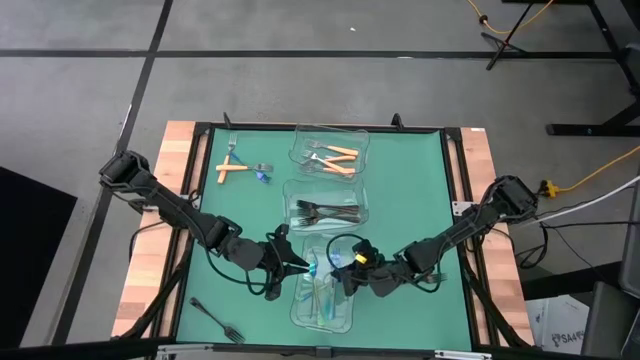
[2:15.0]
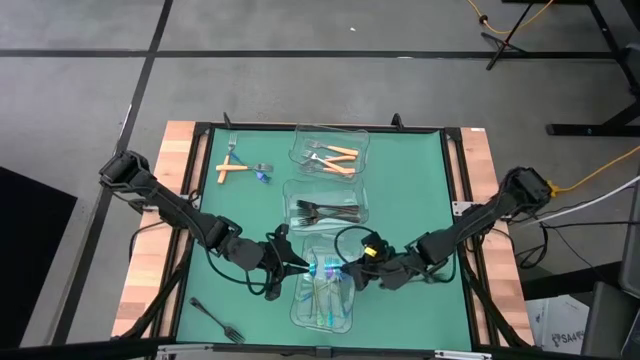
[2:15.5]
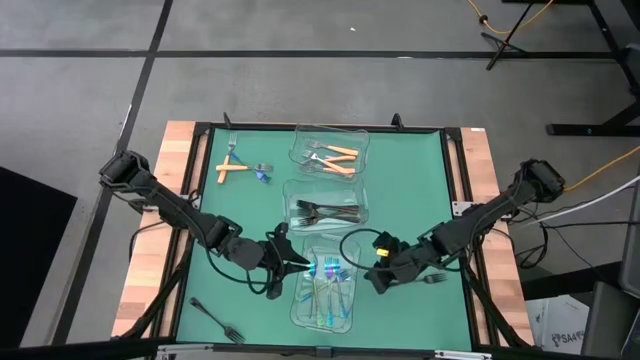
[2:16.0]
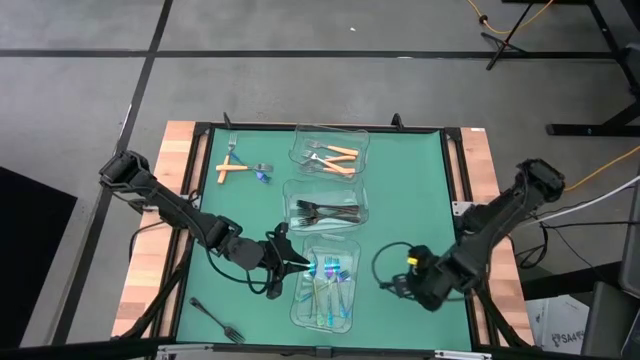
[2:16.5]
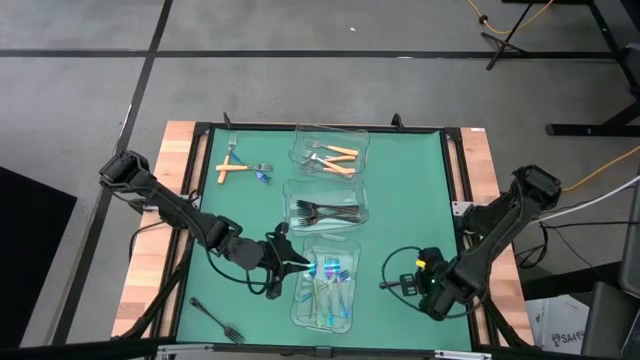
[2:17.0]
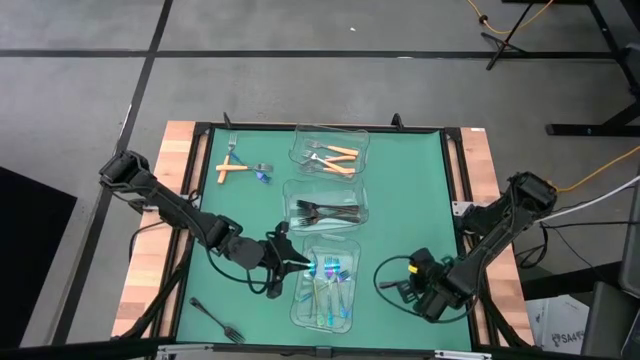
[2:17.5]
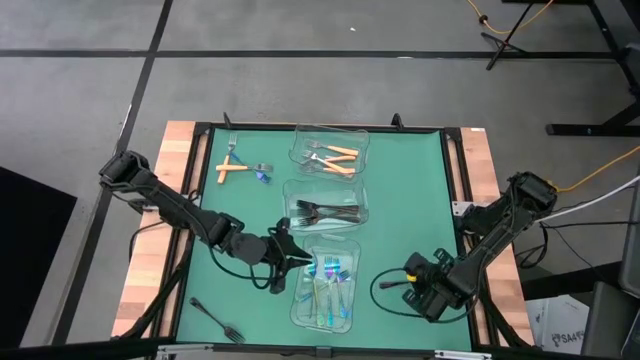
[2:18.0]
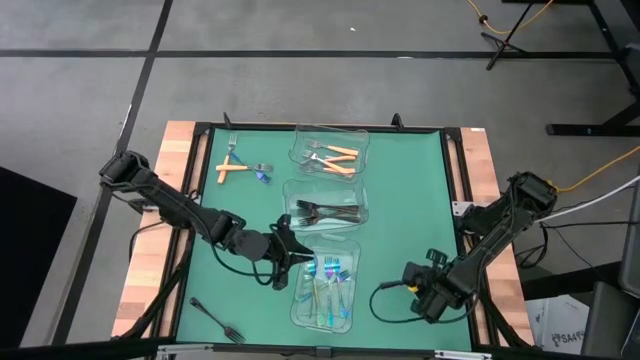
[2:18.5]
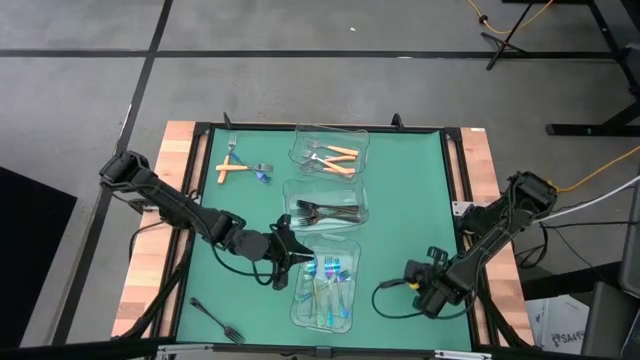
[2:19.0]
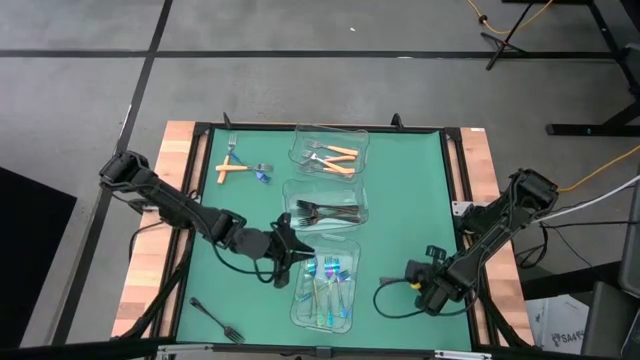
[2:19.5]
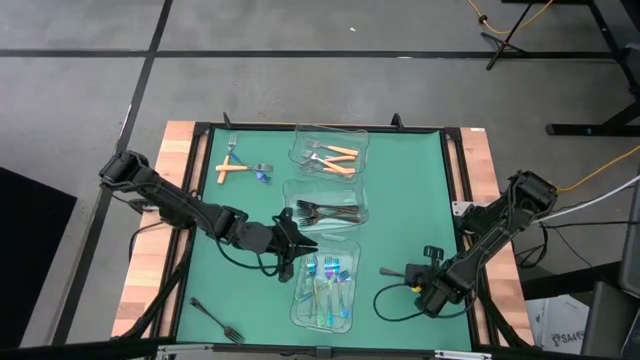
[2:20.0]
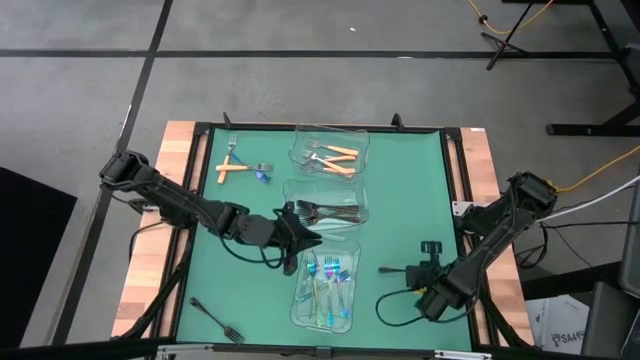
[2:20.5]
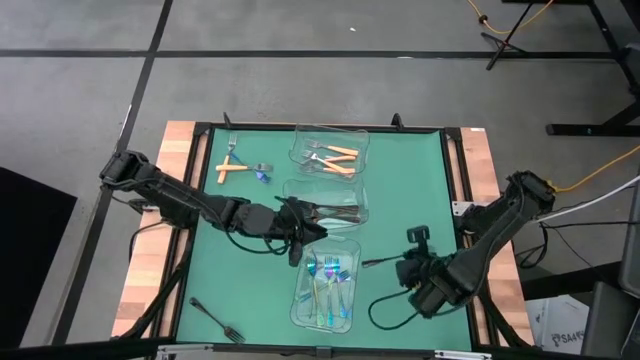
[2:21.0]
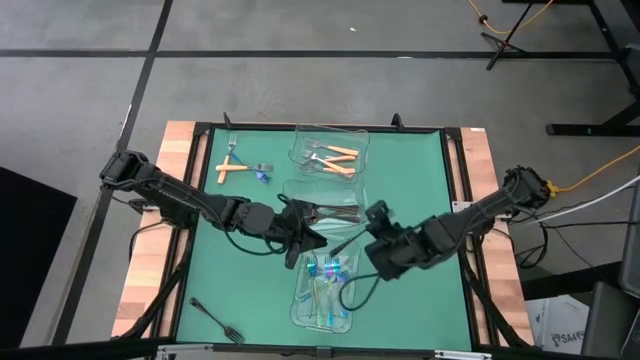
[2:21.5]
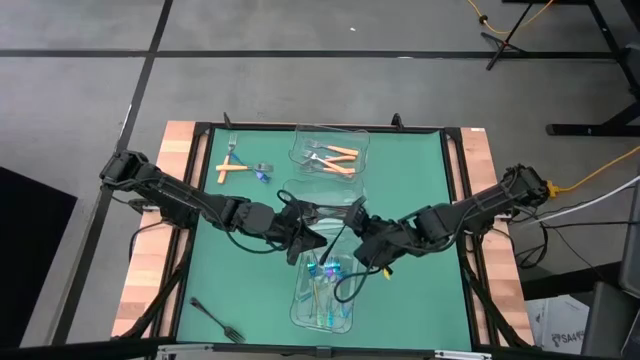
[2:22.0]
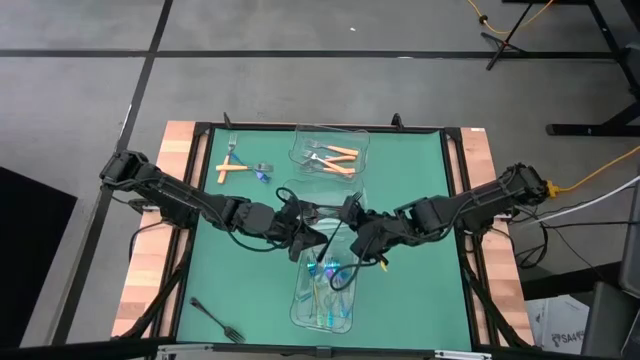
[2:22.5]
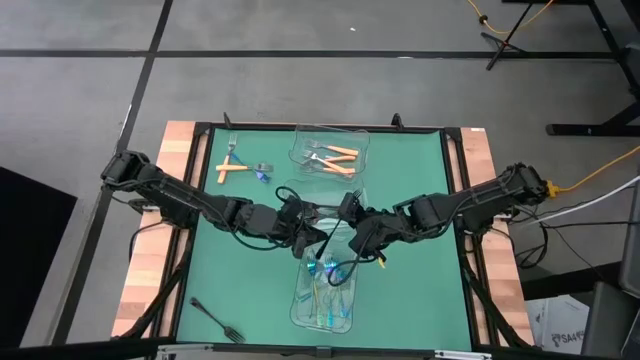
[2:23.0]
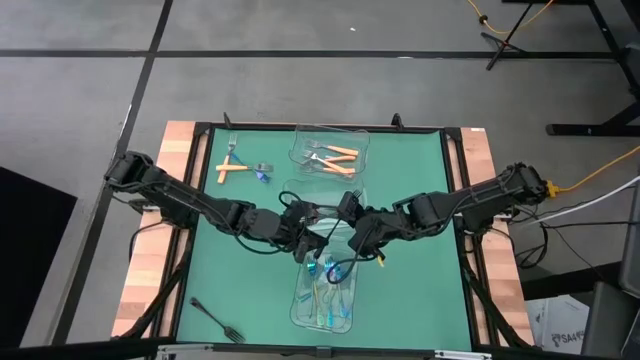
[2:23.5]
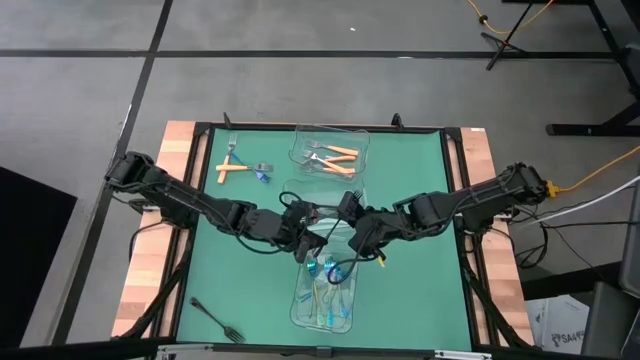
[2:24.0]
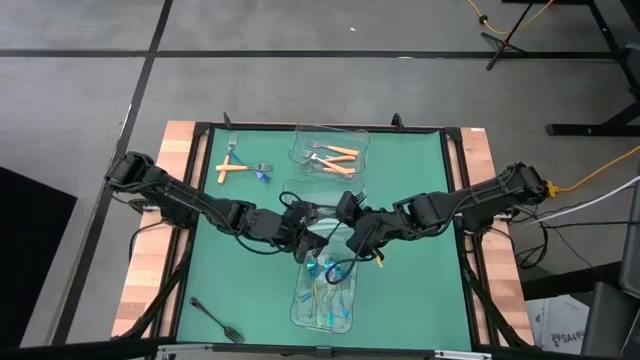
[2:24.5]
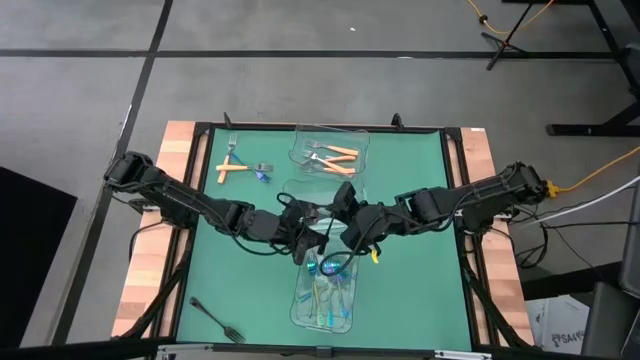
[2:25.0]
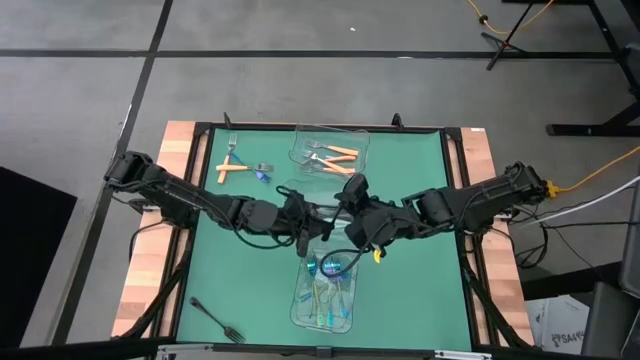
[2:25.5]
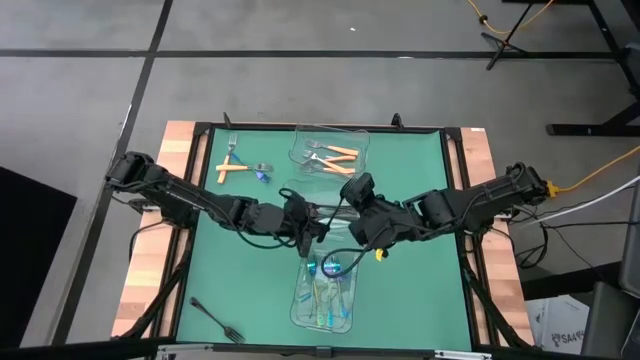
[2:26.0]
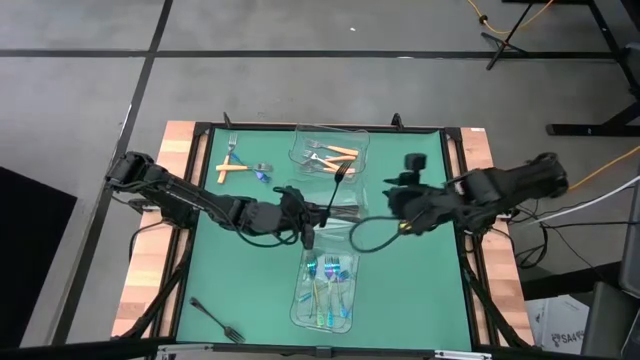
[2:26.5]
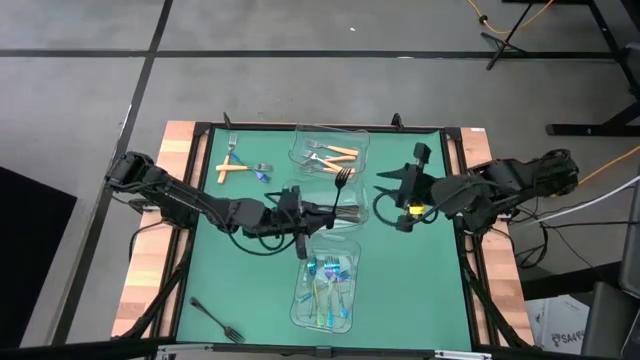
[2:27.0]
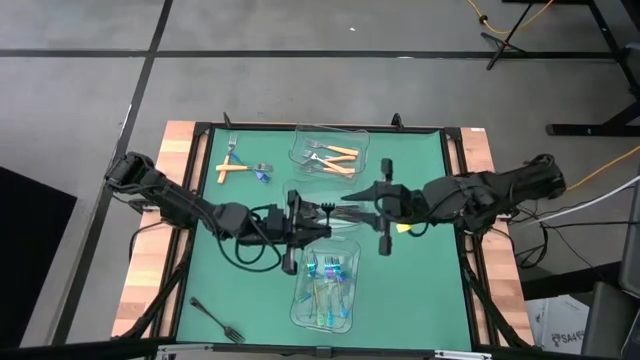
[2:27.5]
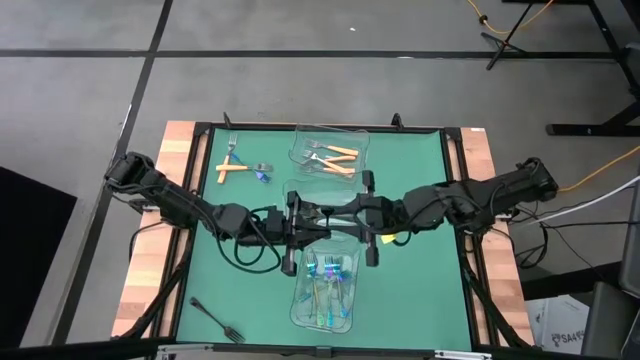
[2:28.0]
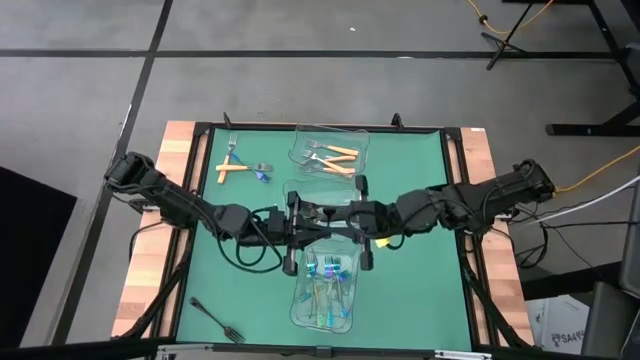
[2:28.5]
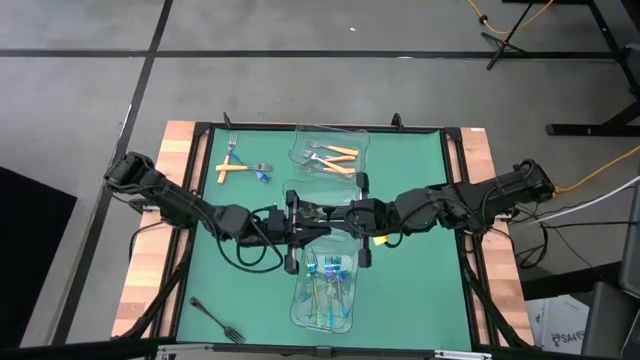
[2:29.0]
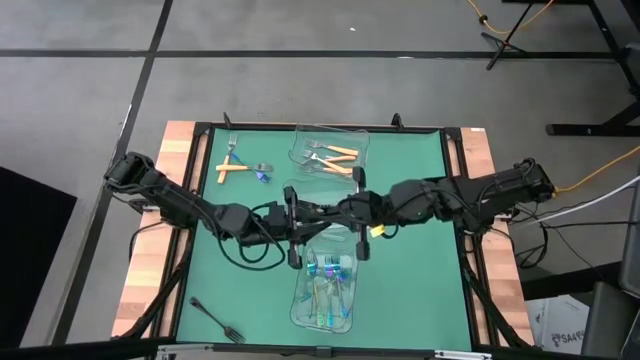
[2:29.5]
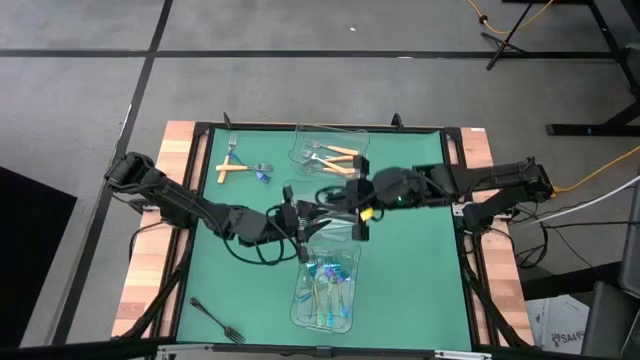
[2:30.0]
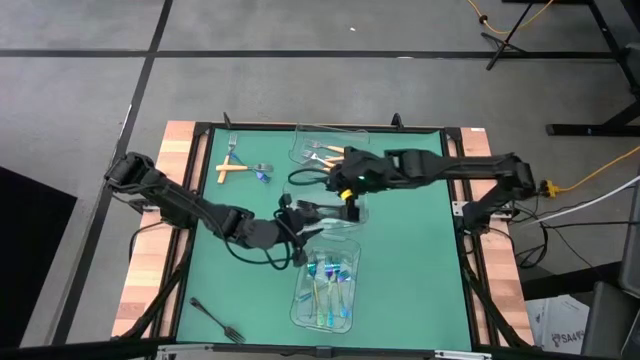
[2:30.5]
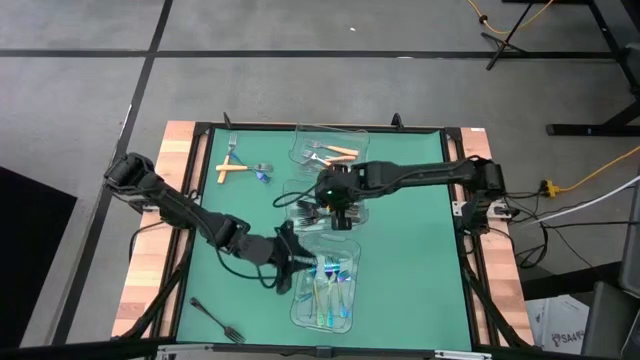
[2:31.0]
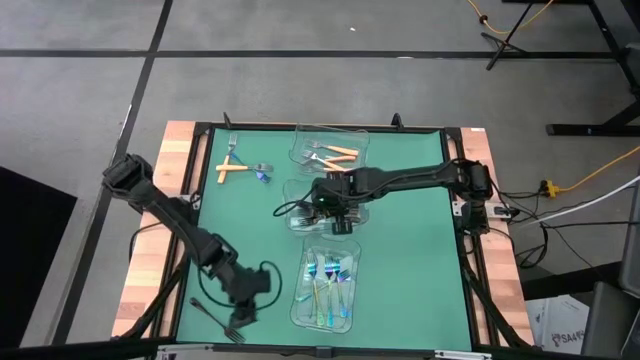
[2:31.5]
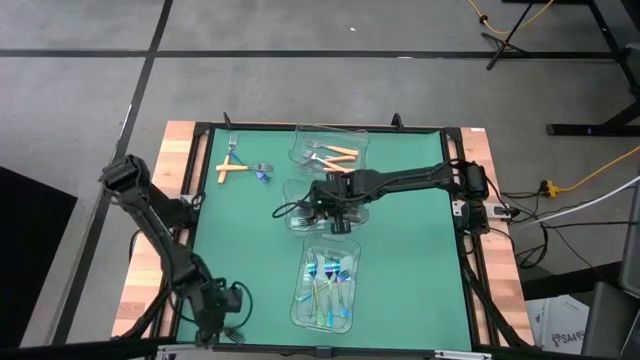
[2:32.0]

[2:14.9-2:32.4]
Task: Sort silverware by color (type)
Put the black fork into the middle transparent bin

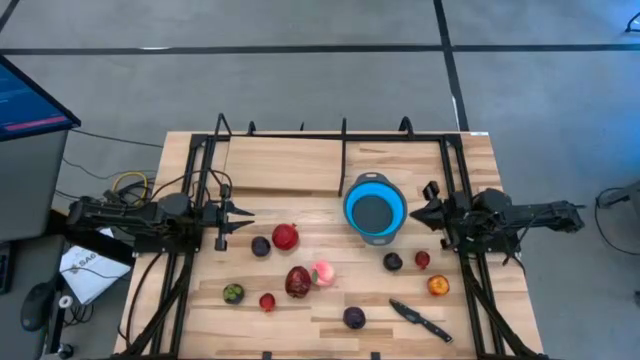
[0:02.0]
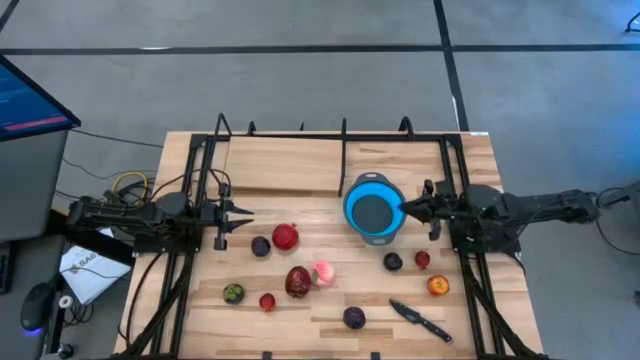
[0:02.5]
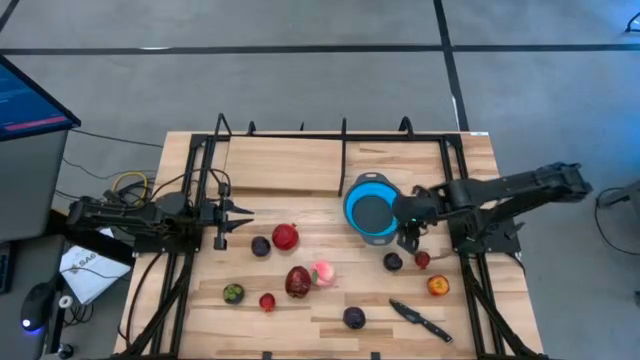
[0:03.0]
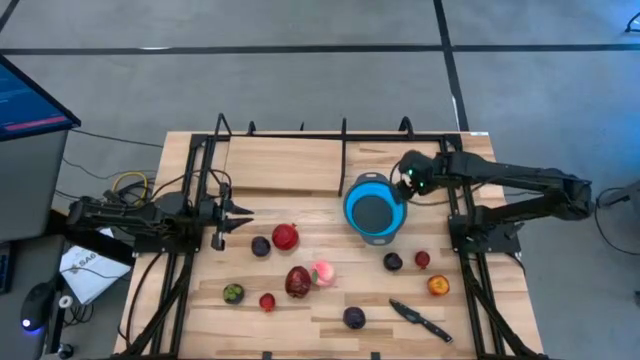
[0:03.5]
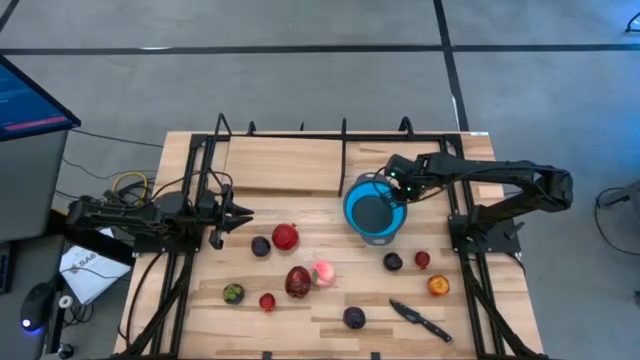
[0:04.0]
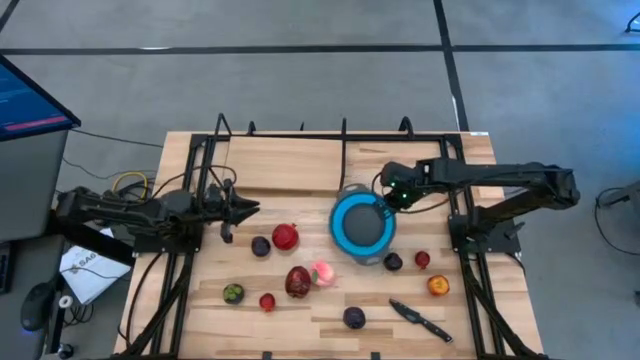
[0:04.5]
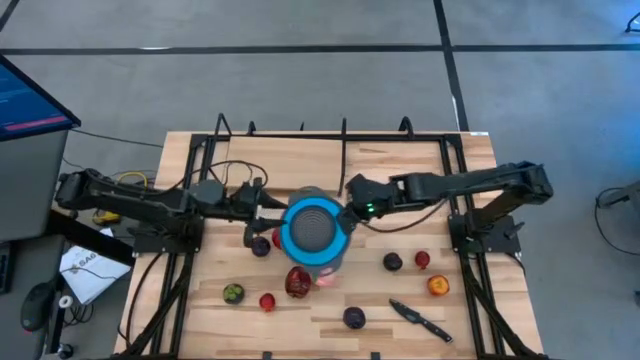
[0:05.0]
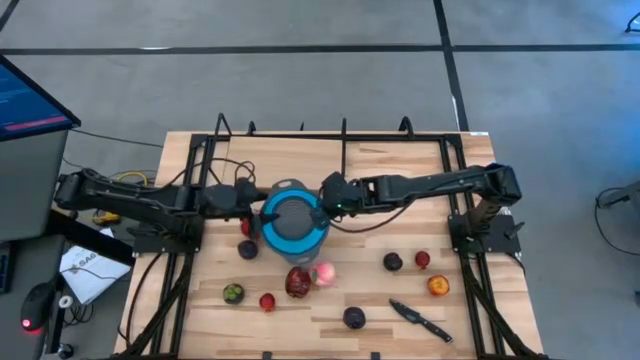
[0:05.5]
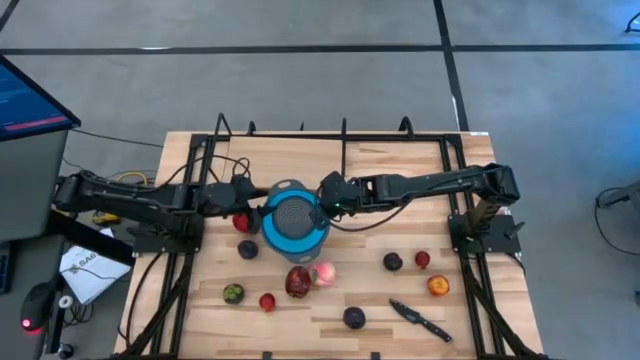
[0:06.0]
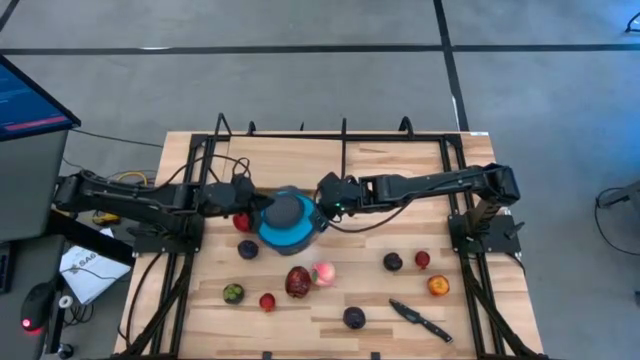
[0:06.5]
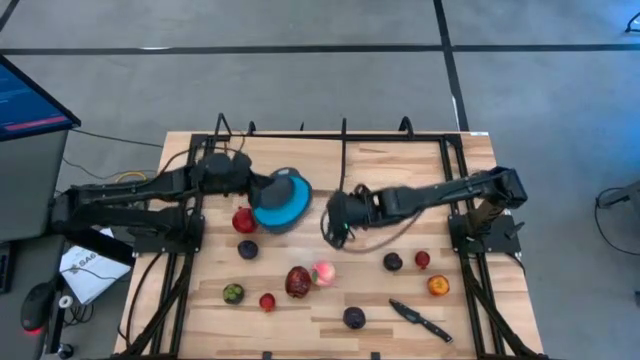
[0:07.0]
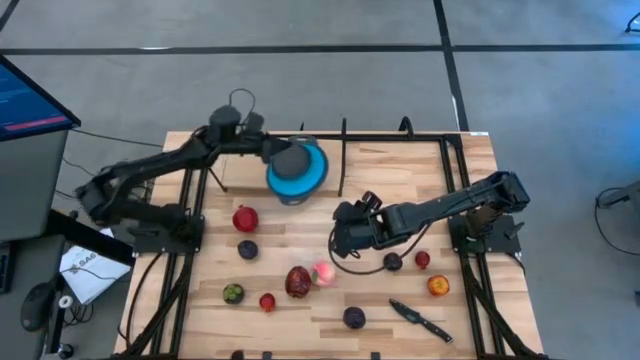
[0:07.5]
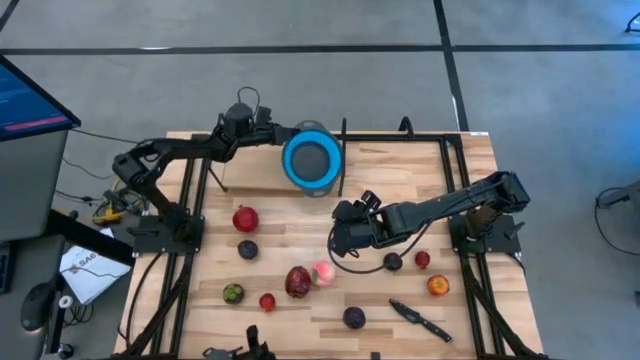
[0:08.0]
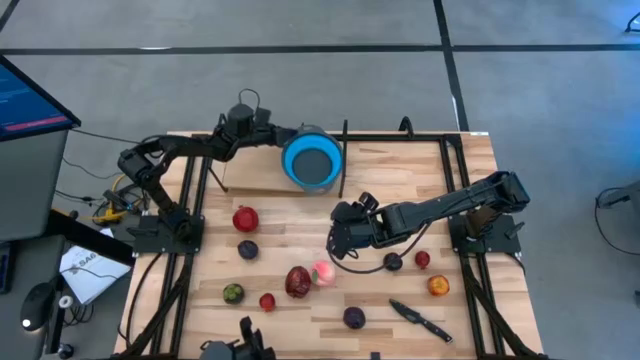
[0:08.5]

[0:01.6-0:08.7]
Task: Pick & Place Fruit
Put the blue strainer bowl on the shelf
